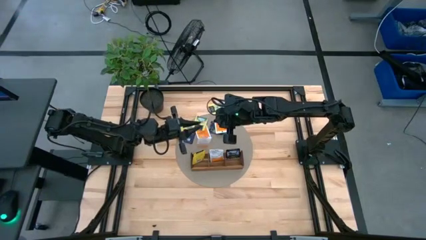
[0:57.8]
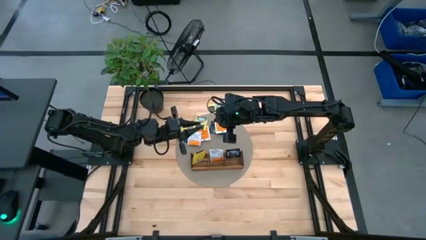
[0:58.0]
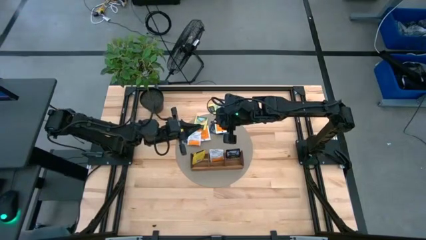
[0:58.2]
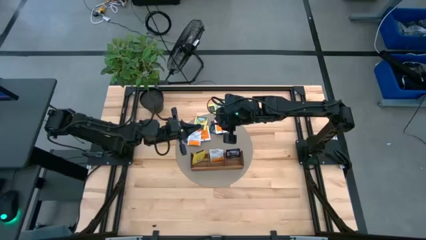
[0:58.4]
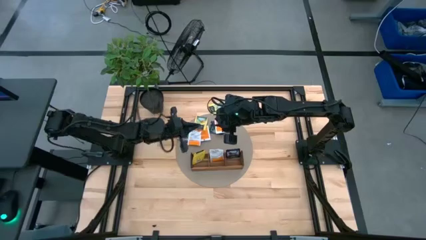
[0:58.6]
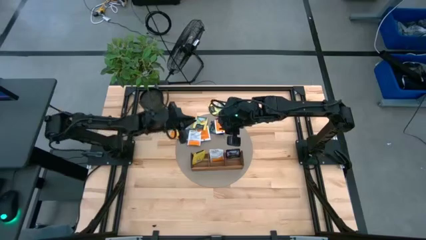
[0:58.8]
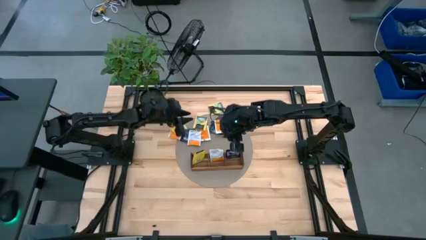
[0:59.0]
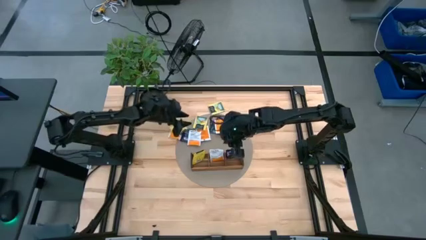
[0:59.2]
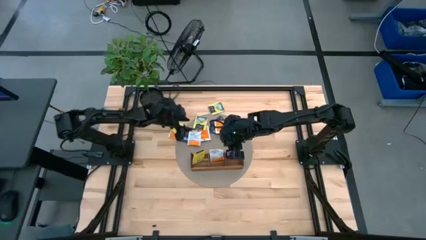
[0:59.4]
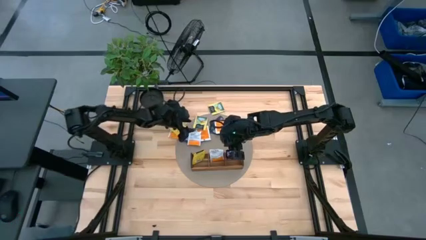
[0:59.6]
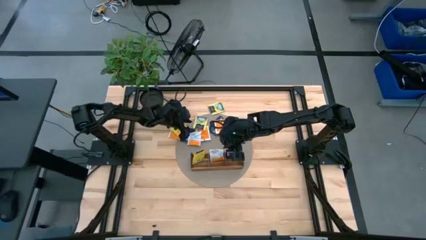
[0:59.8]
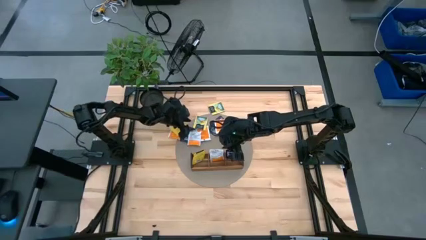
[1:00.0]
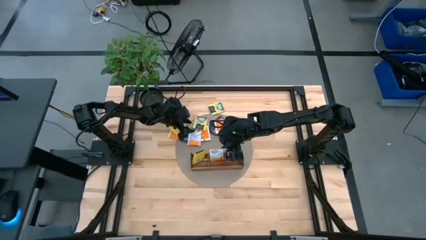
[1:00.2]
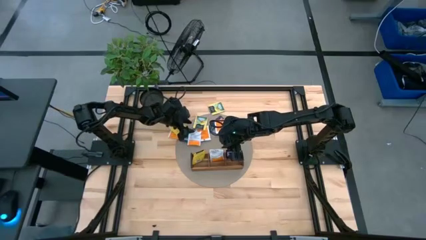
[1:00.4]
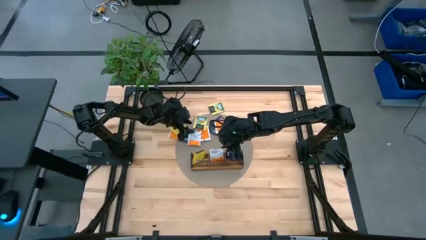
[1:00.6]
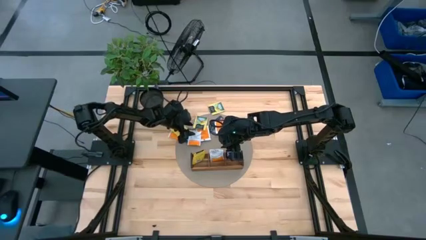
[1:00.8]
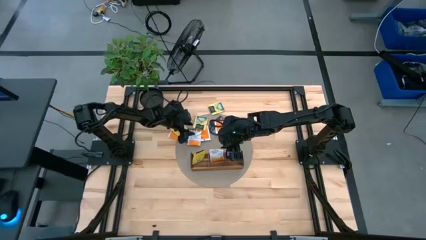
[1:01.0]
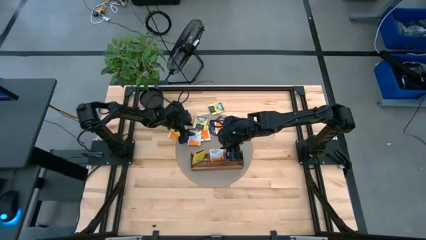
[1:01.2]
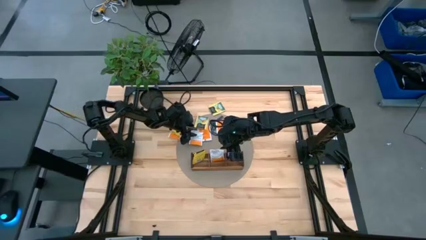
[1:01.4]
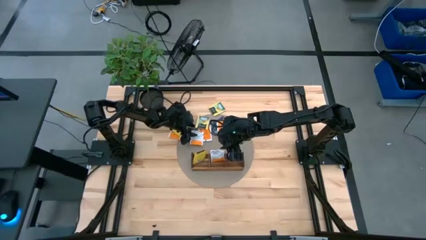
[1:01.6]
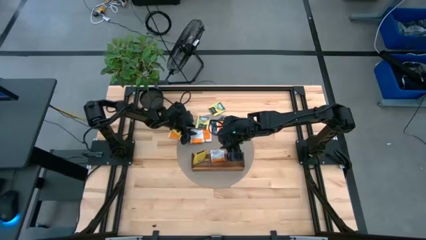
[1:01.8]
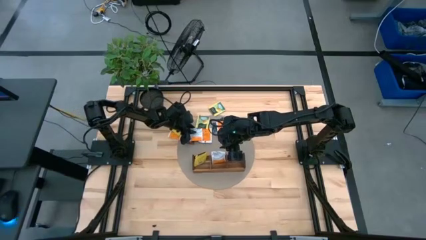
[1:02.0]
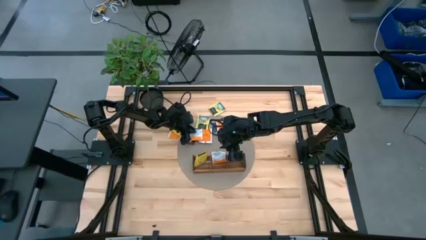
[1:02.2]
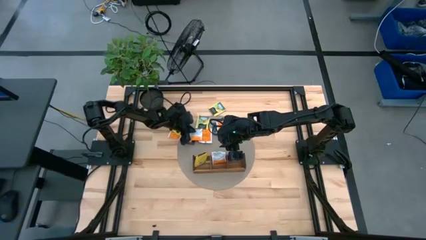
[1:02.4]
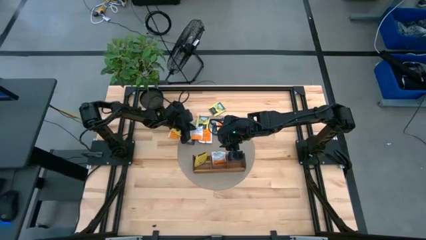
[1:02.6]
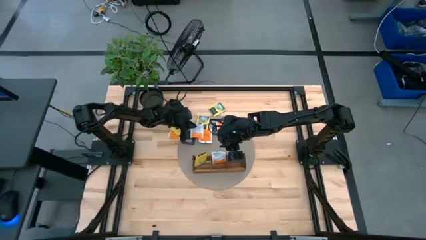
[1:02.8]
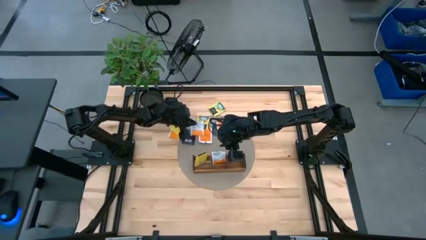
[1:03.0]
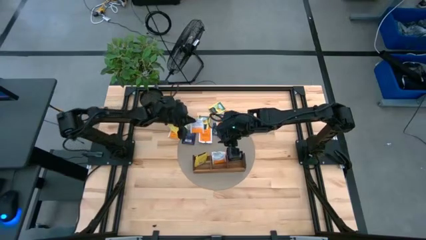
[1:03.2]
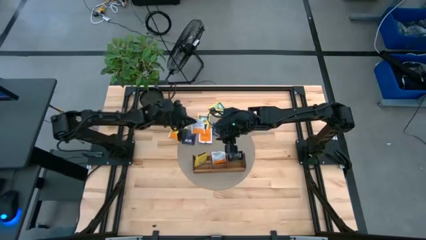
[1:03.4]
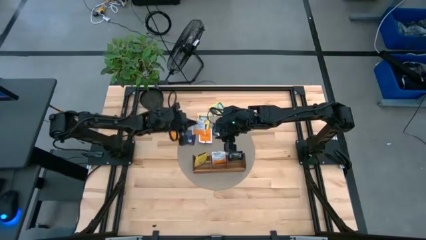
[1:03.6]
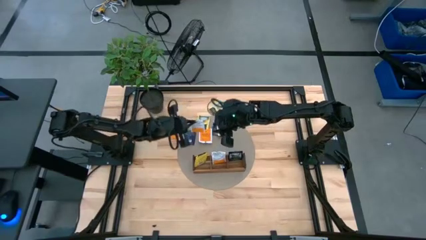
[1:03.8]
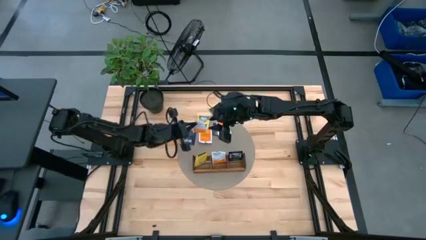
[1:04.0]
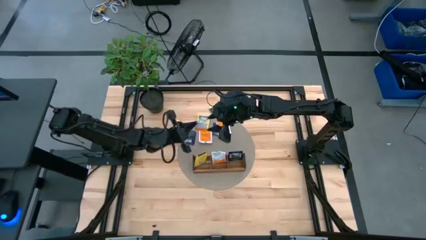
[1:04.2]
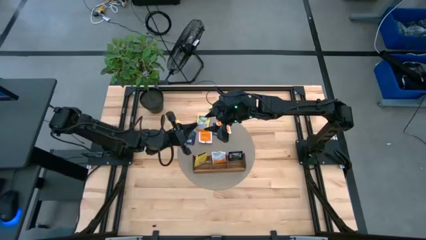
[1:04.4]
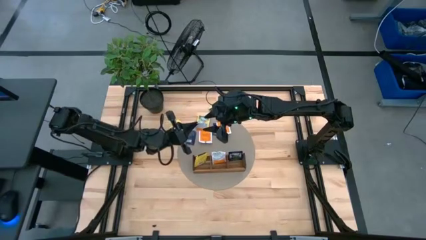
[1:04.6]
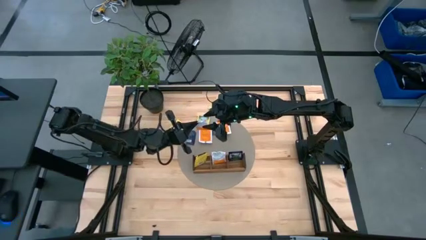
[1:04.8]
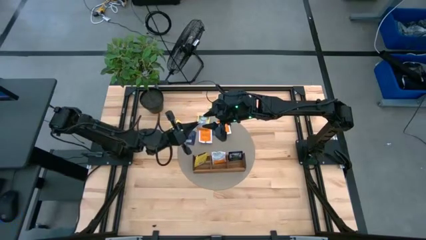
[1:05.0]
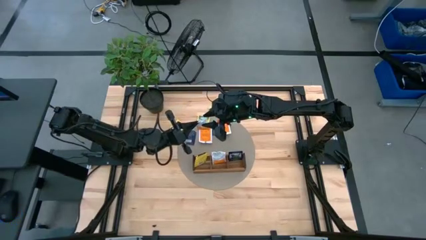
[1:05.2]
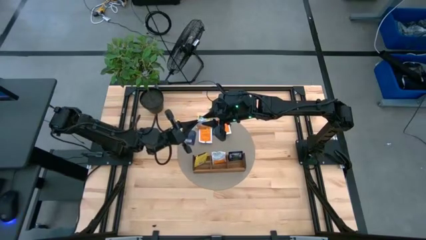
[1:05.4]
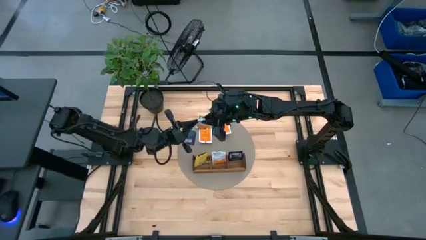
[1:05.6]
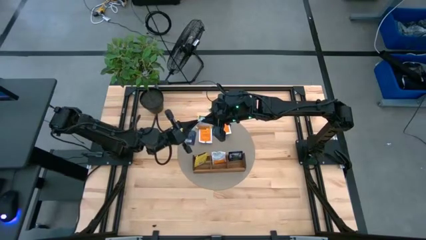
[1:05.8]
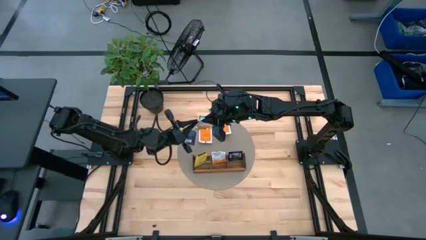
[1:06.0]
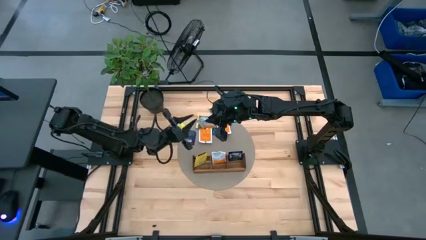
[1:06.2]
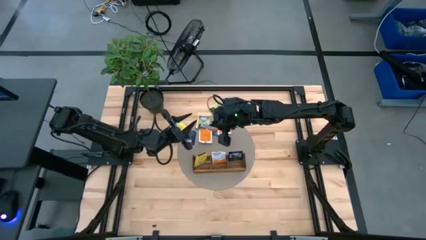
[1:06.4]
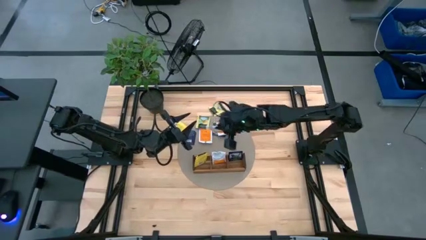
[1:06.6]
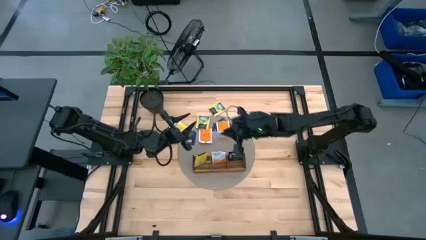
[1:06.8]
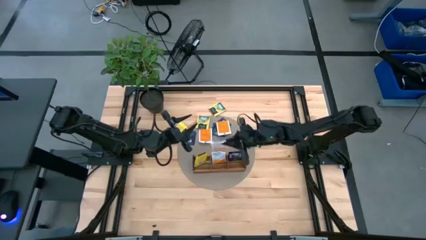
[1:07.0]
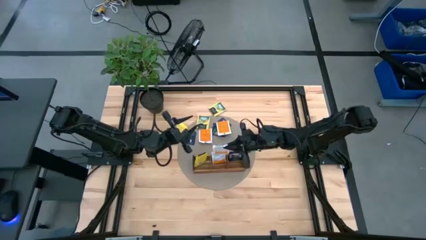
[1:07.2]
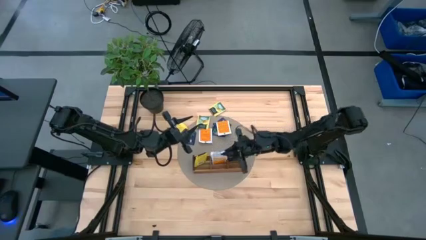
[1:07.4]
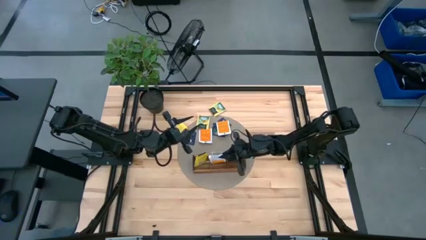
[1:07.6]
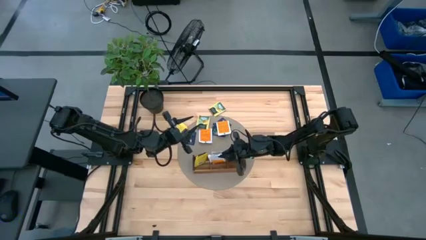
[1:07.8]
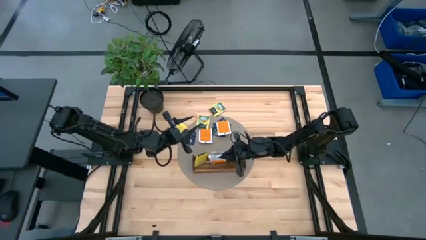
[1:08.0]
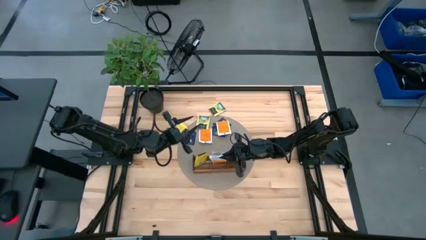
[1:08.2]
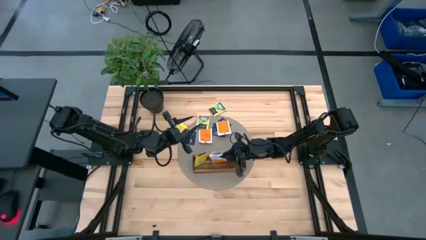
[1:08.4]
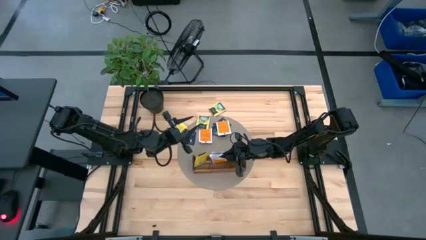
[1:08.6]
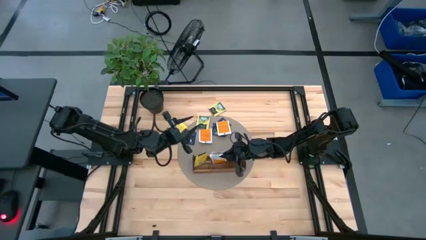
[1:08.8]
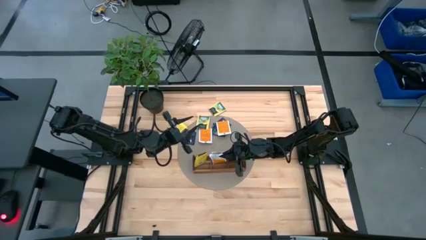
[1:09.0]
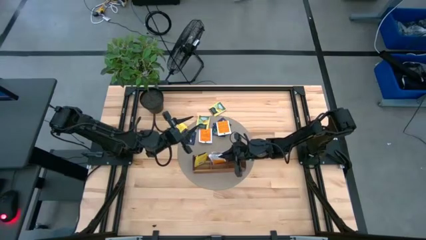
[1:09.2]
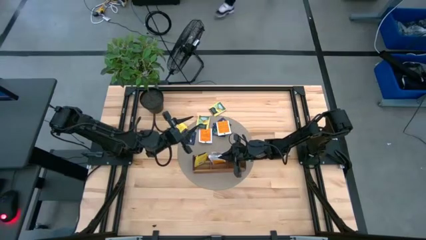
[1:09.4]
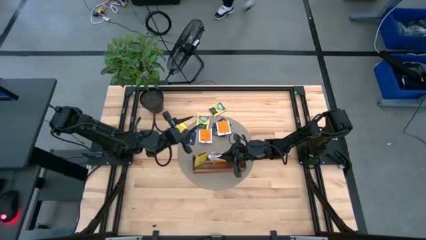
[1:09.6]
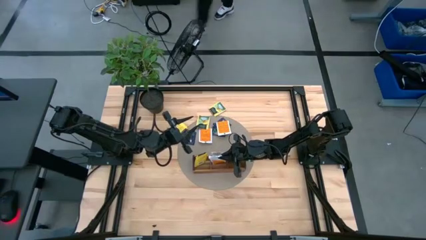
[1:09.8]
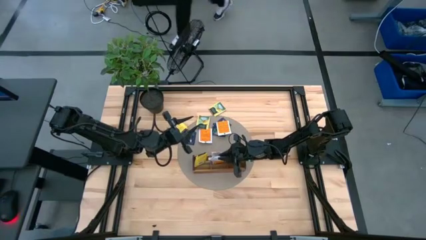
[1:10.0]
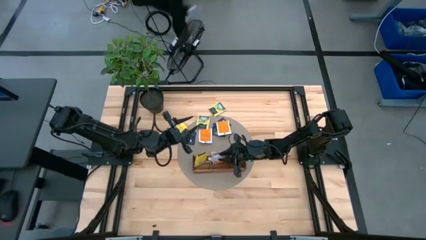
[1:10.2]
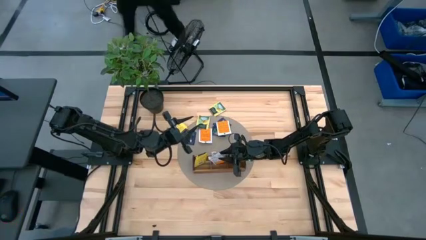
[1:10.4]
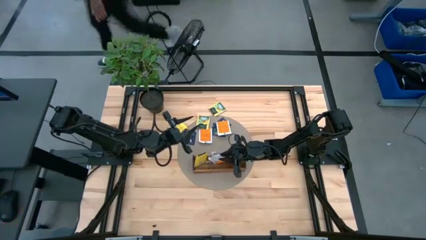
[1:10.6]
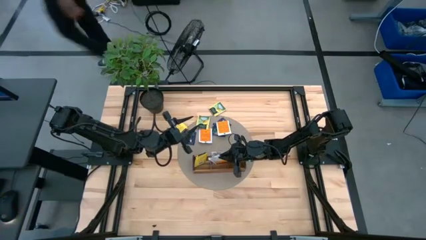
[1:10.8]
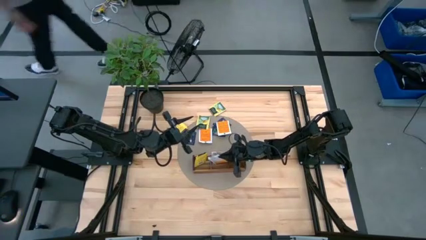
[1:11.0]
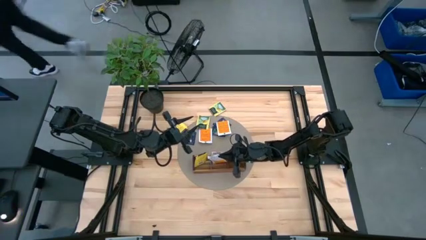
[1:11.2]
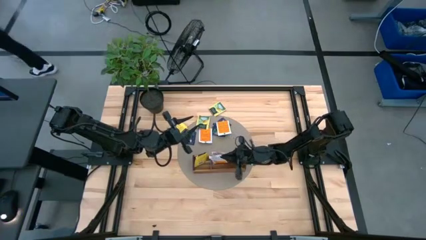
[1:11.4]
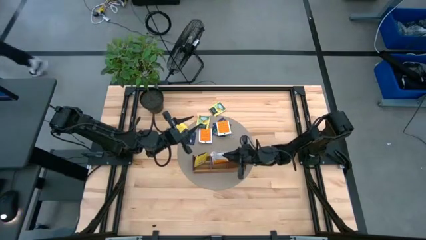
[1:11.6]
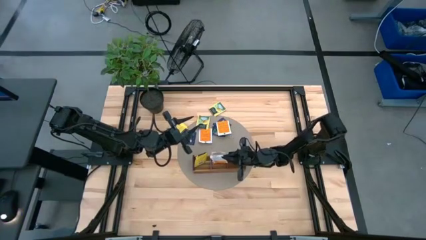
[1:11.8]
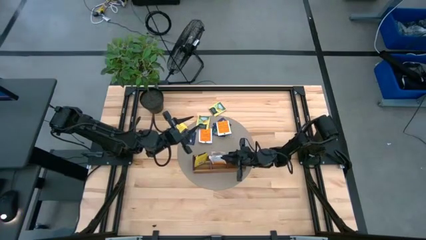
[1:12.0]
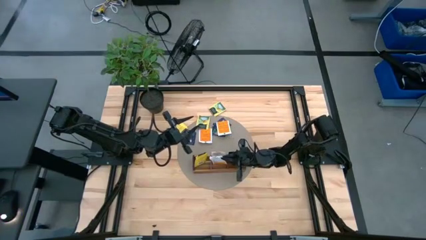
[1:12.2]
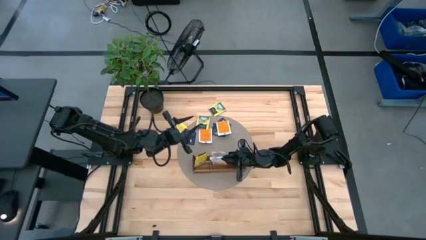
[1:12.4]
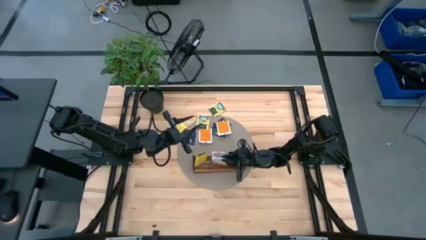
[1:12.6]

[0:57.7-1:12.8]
Task: Pick & Place Tea
Put the orange tea bag into the middle section of the wooden organizer
